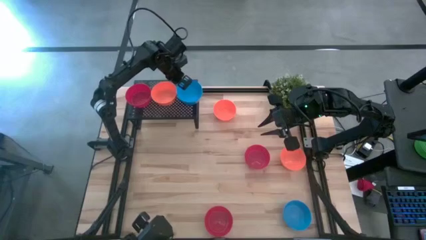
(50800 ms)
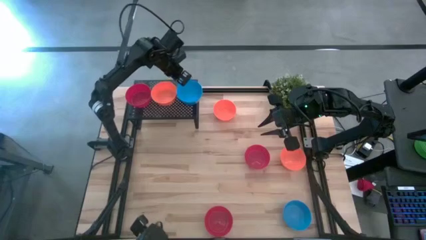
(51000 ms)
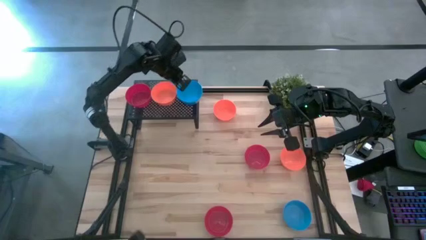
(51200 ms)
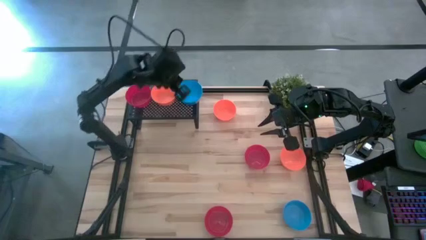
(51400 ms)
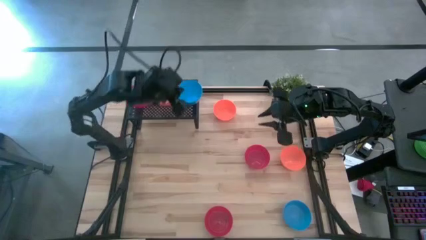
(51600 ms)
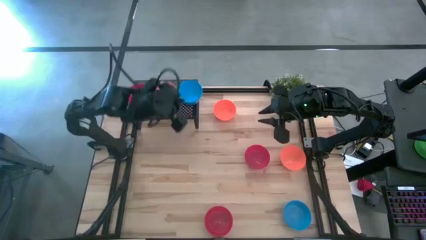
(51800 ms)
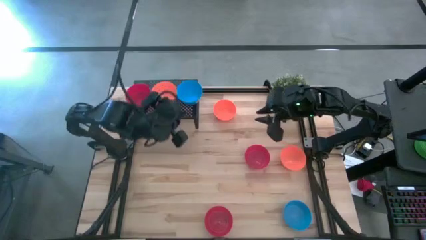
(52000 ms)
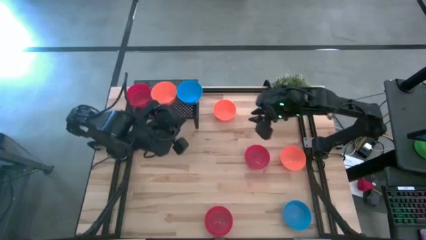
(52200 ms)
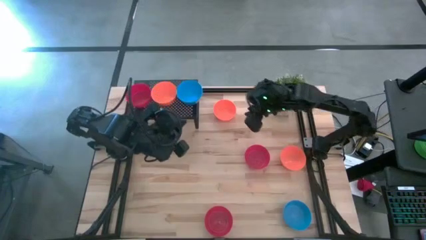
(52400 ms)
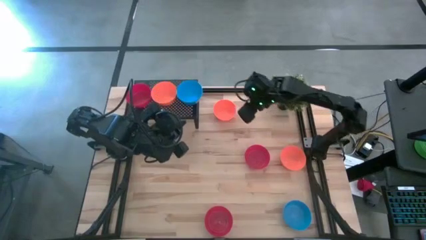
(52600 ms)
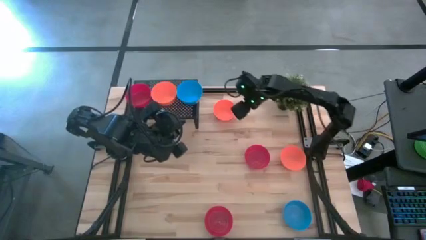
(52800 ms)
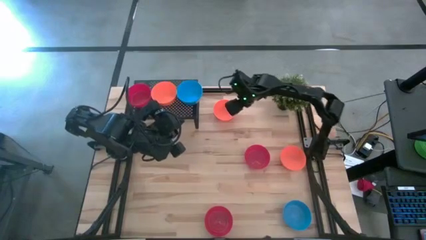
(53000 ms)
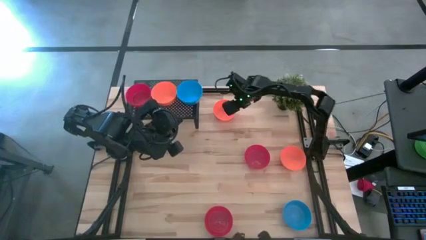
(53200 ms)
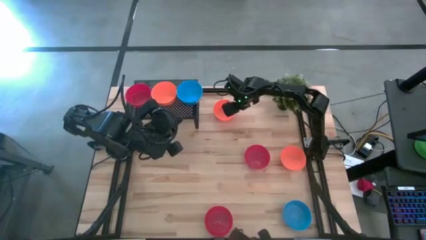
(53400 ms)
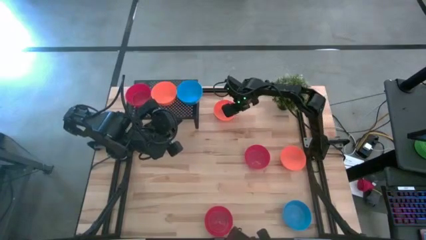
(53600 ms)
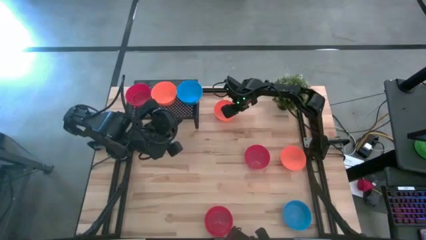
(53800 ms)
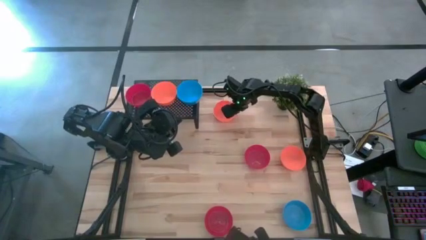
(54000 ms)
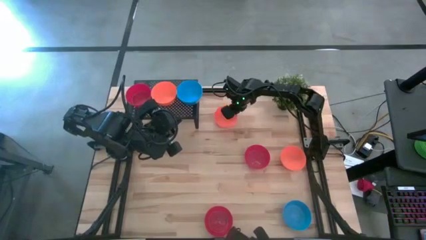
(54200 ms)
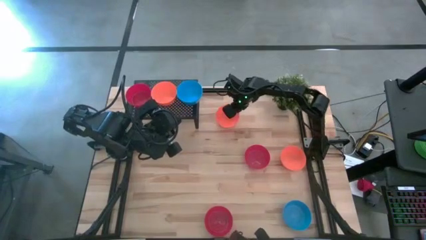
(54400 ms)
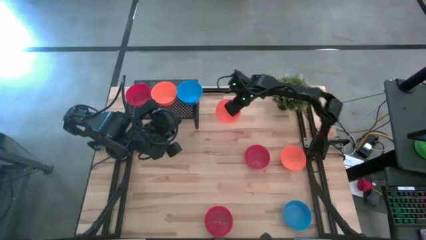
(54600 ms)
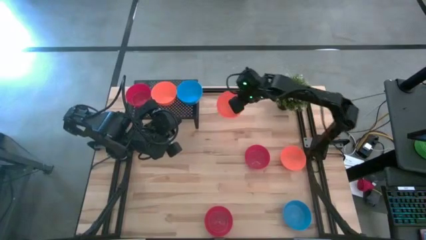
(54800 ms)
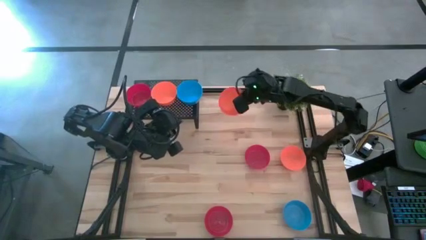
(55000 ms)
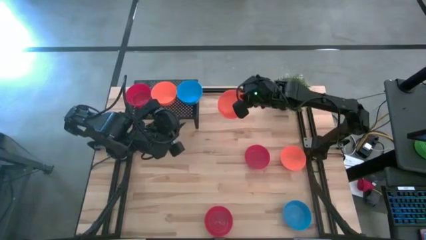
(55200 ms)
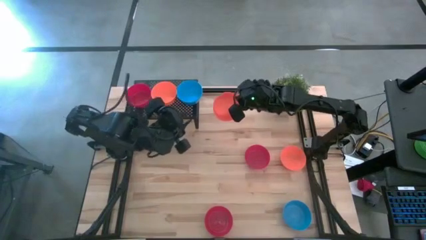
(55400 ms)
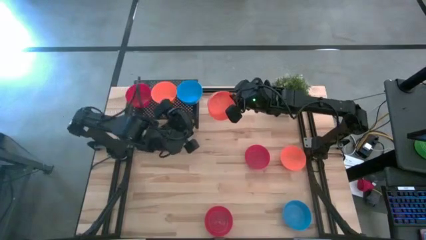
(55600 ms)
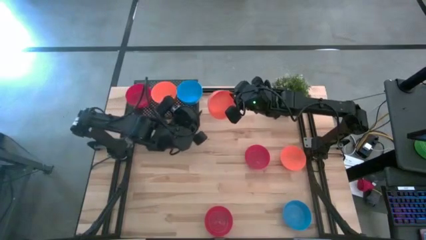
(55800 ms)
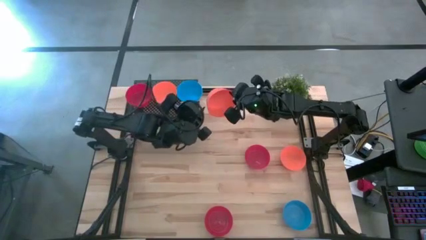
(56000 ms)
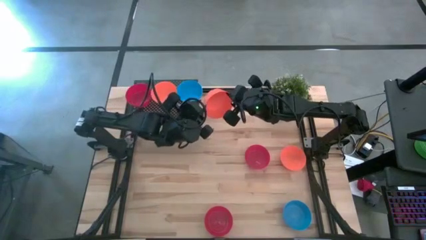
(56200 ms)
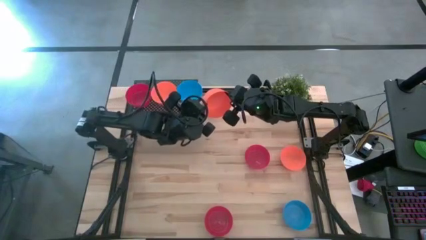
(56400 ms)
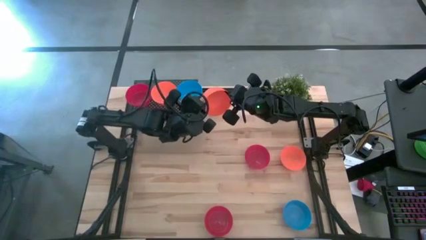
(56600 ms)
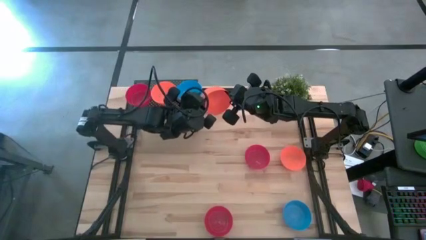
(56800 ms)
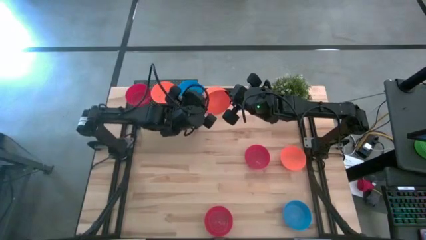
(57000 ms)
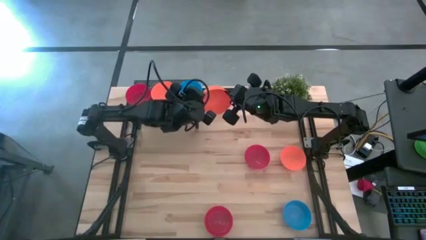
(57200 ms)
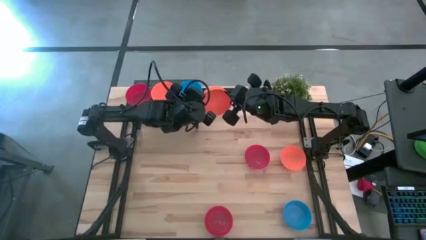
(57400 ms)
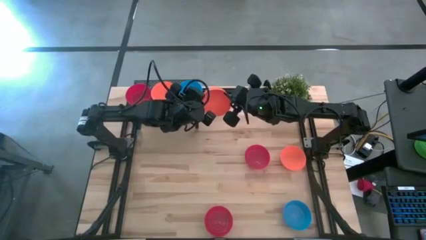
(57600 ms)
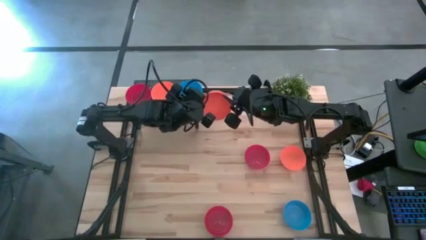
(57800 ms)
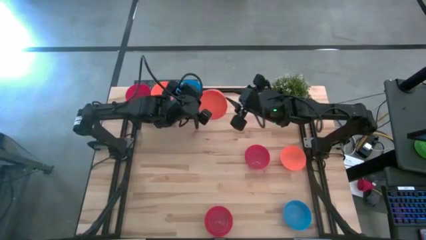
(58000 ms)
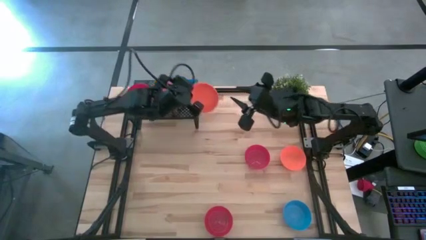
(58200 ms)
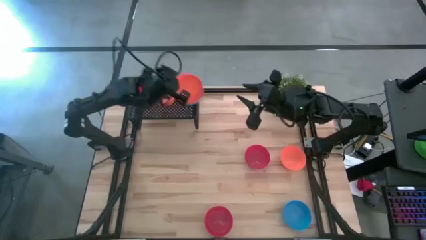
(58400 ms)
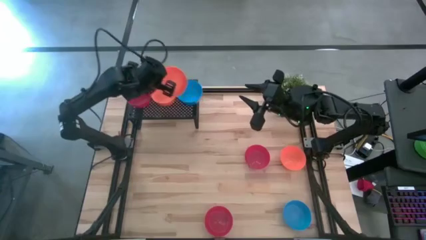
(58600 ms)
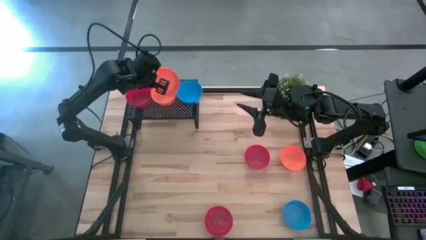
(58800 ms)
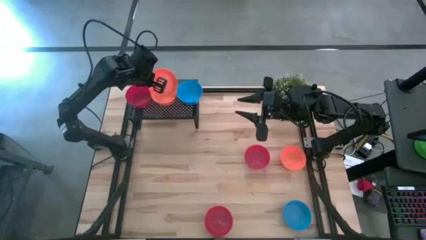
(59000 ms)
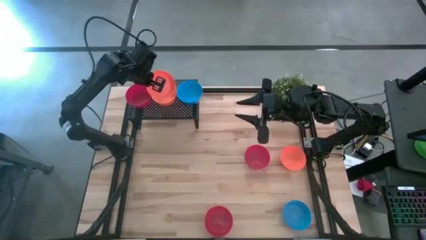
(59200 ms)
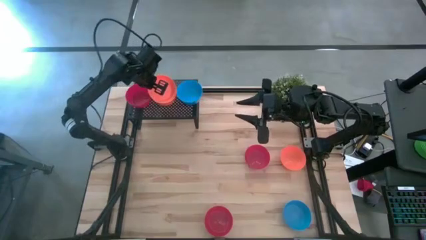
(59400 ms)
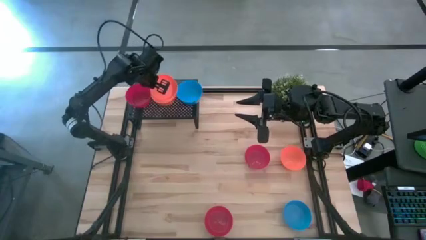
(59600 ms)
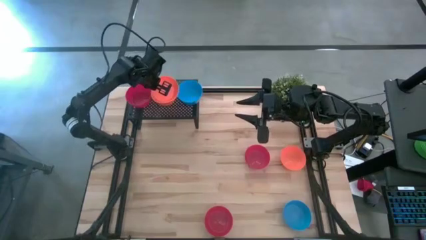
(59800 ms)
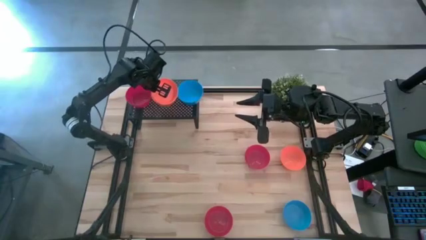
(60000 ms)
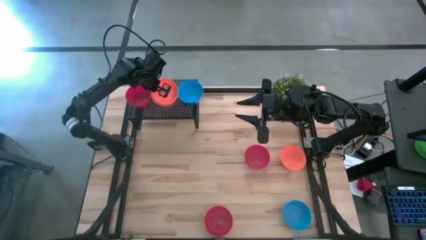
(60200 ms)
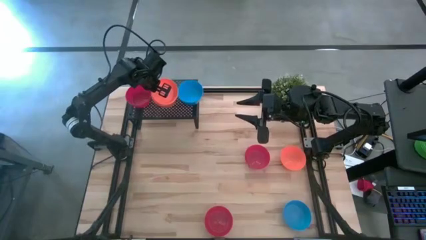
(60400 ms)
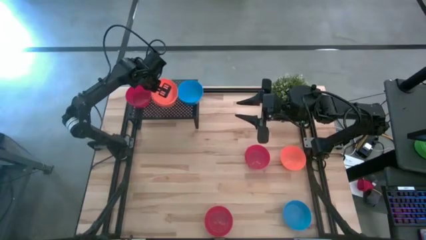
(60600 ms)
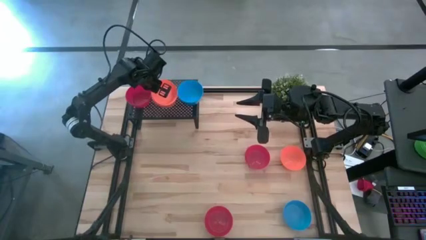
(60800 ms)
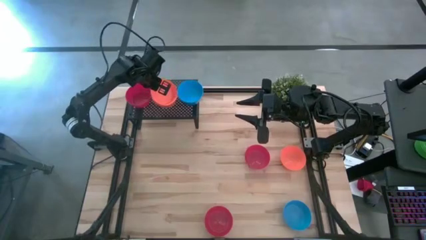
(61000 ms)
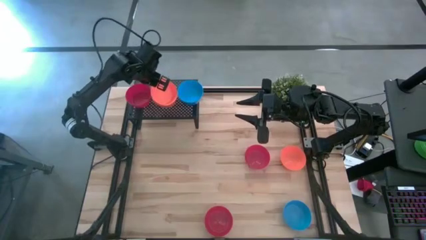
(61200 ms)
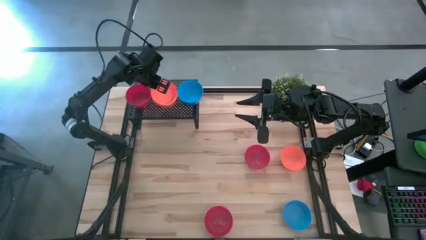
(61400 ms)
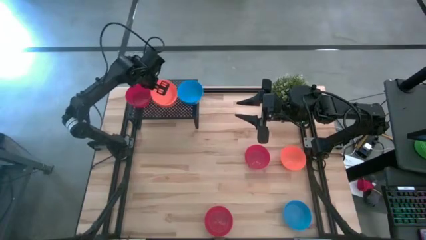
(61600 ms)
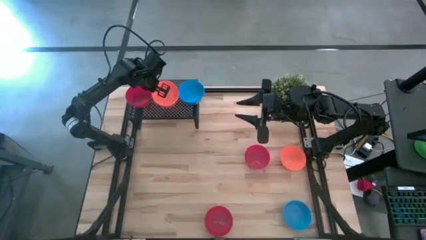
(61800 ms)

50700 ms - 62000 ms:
Task: Pick & Place Mini bowls
Stack the top orange bowl on top of the orange bowl on the shelf

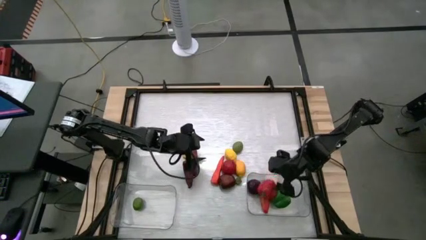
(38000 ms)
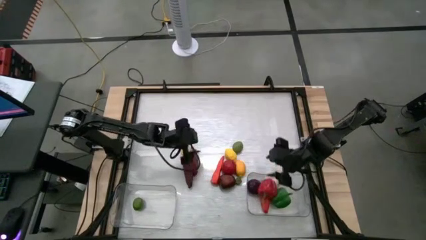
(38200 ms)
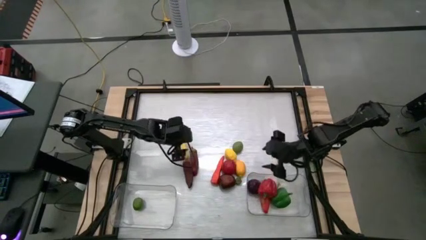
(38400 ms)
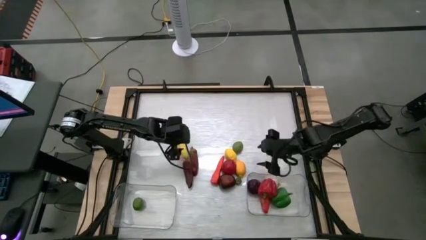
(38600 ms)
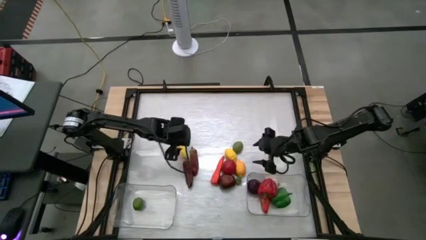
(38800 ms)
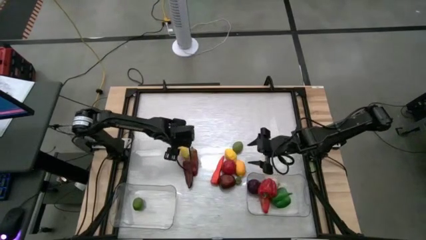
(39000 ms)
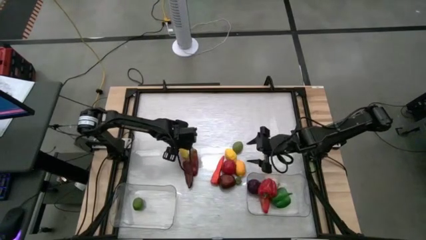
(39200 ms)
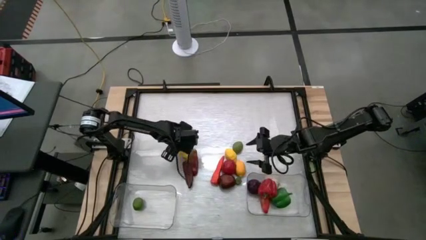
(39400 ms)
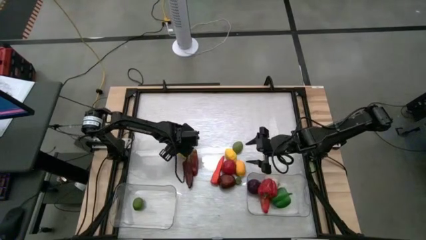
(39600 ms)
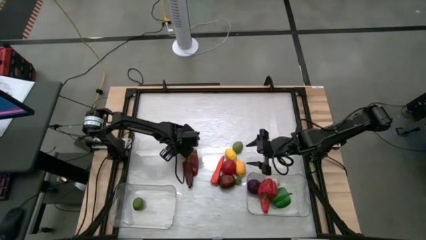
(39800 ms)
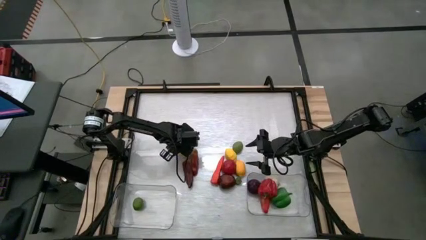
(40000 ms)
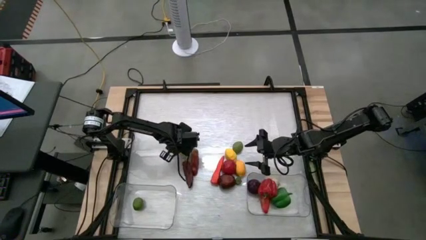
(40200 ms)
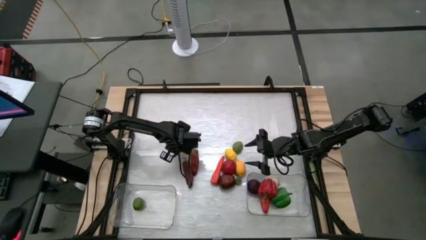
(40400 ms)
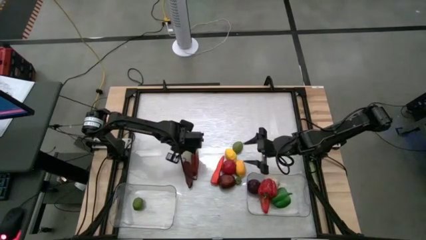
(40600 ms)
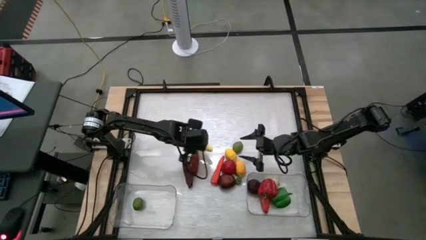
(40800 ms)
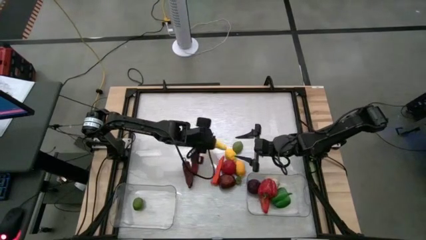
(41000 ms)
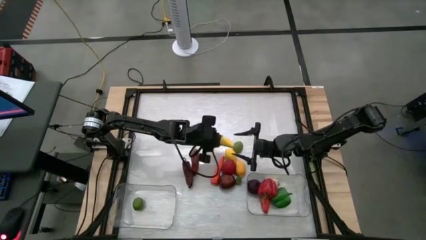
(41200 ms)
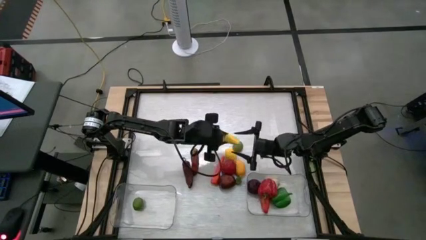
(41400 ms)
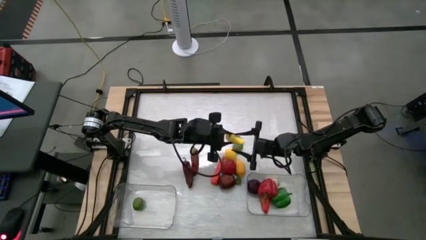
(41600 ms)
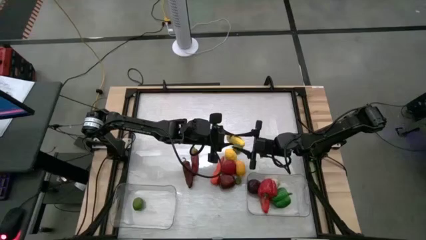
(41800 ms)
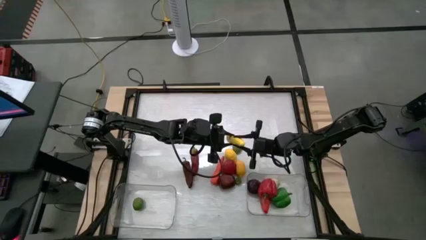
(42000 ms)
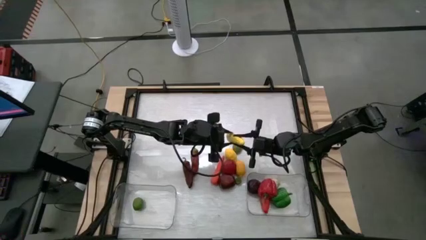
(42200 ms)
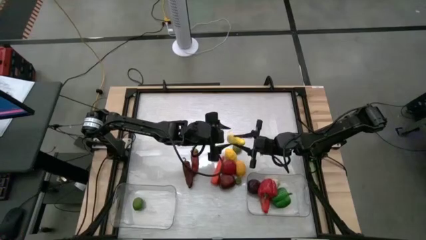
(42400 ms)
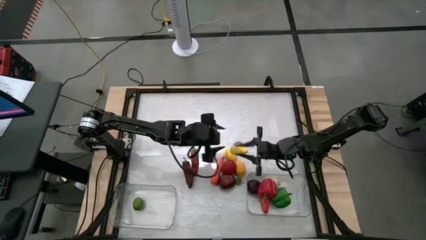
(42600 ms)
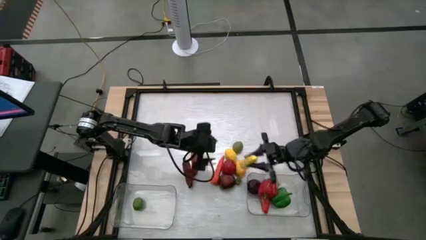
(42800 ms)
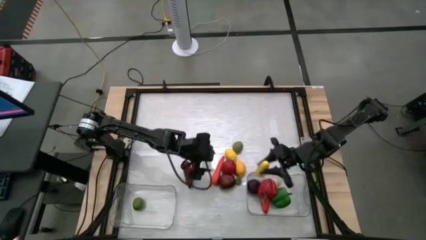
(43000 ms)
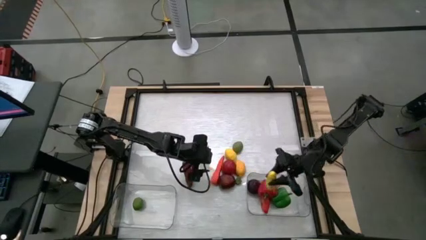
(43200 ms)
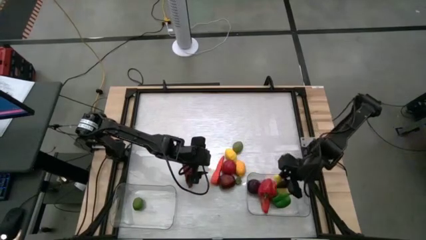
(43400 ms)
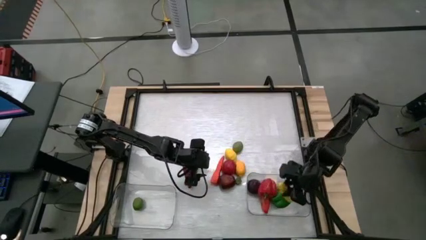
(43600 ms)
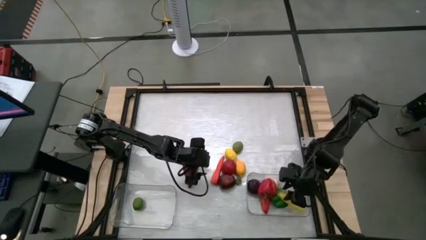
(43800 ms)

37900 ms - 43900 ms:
Task: Sort produce into baskets
Put the corn into the right transparent bin
